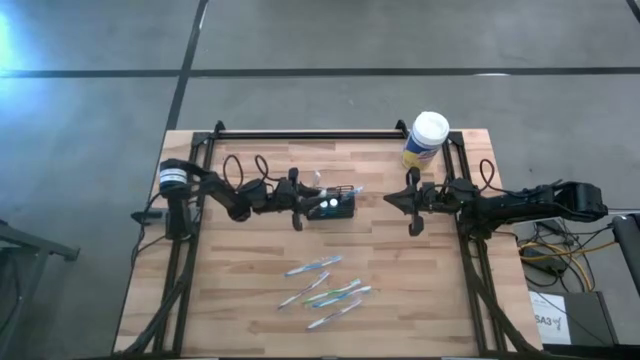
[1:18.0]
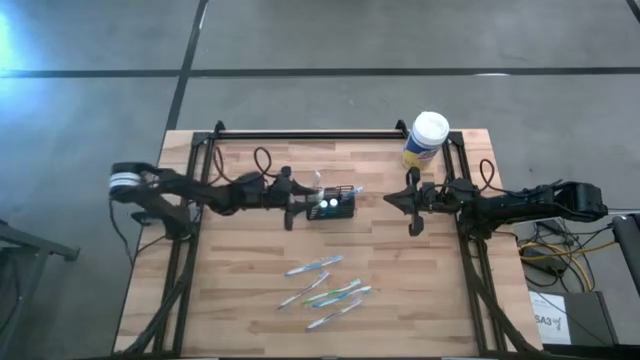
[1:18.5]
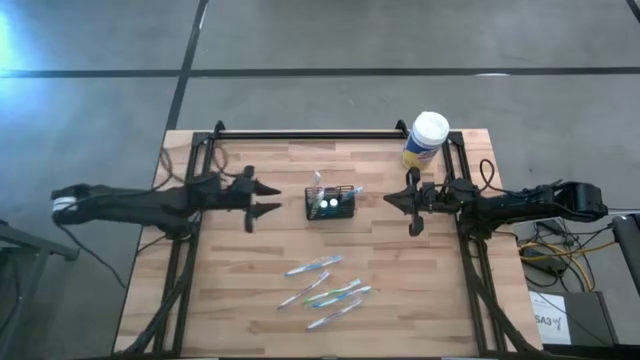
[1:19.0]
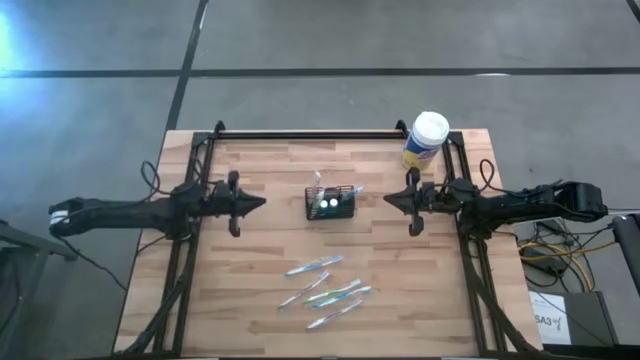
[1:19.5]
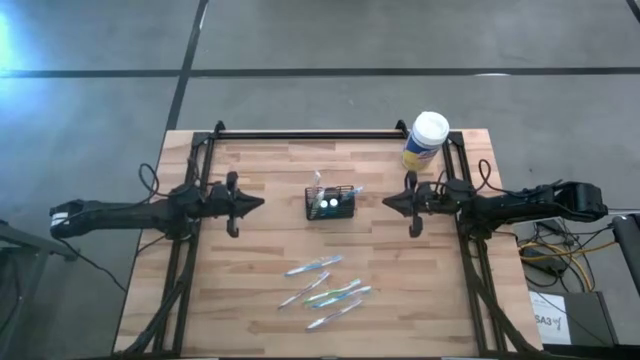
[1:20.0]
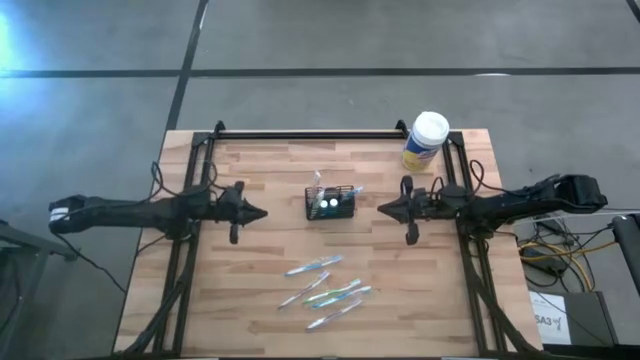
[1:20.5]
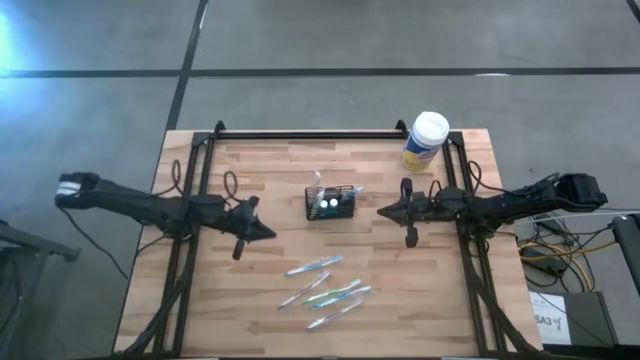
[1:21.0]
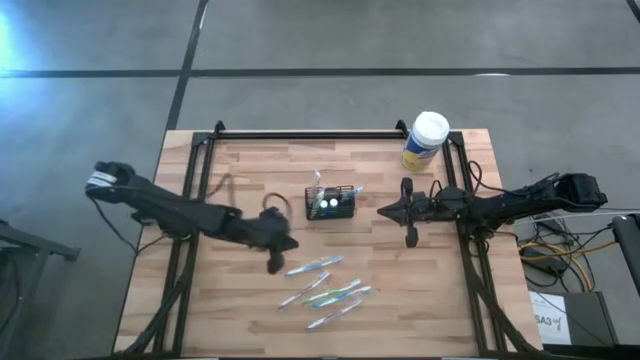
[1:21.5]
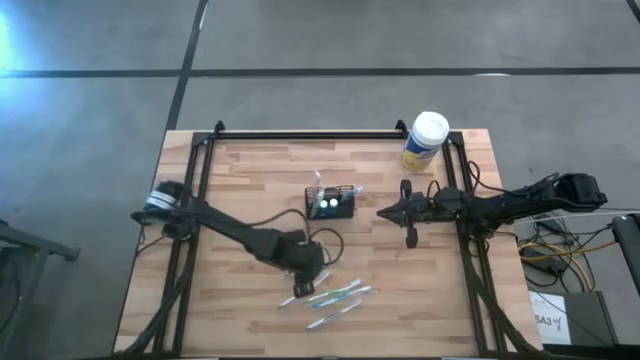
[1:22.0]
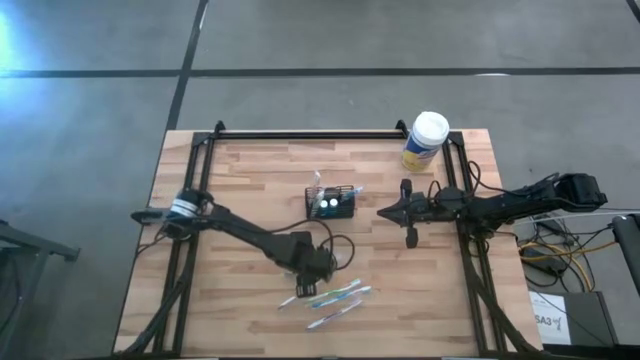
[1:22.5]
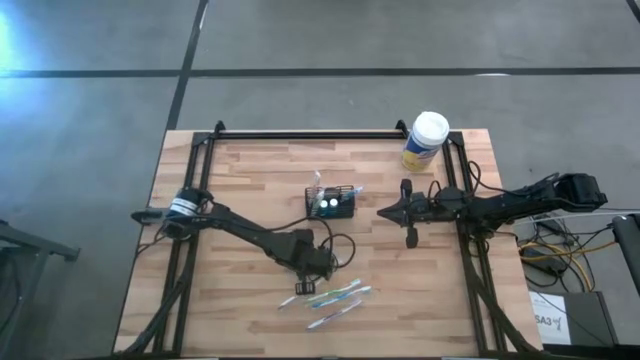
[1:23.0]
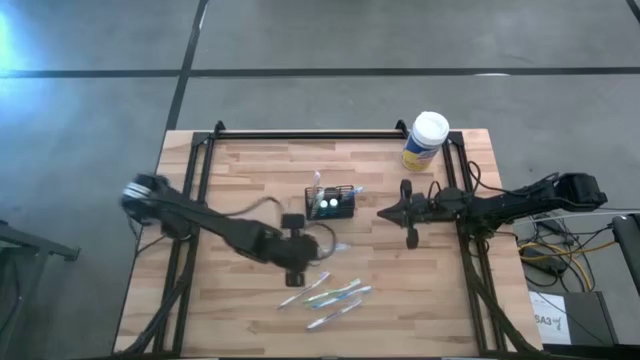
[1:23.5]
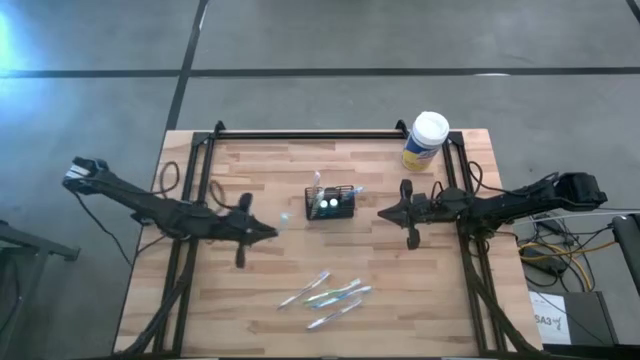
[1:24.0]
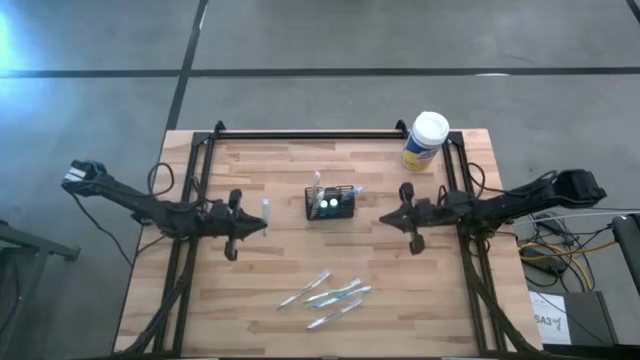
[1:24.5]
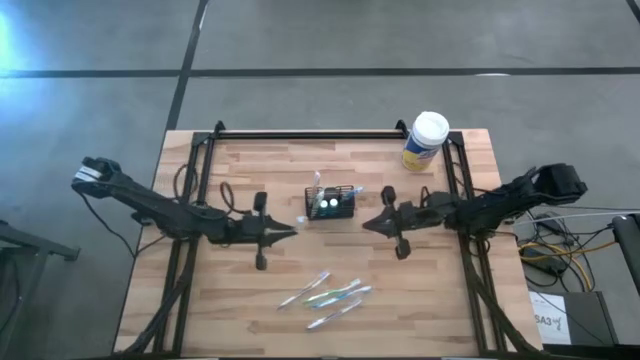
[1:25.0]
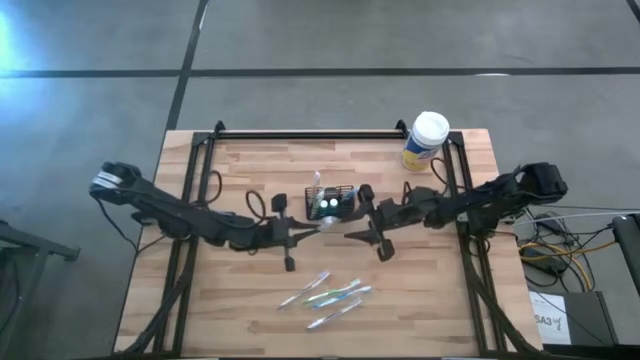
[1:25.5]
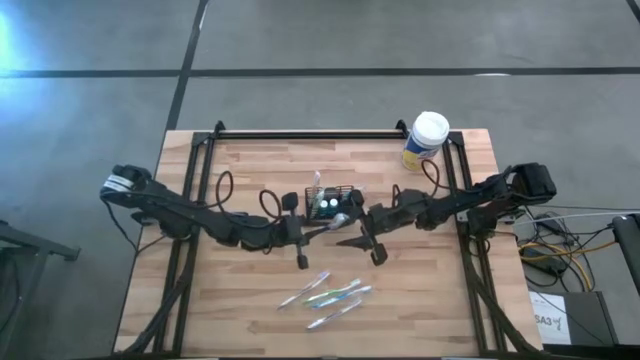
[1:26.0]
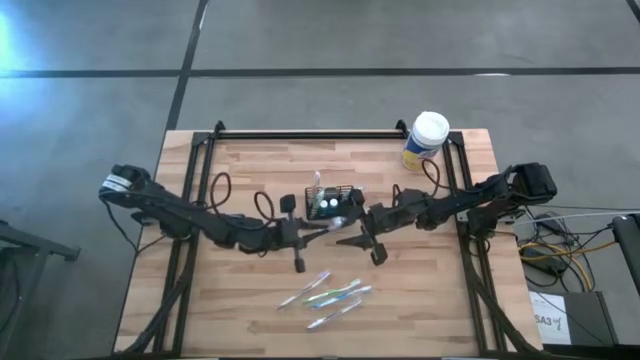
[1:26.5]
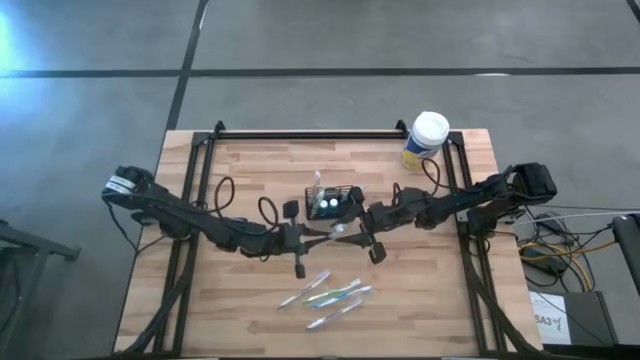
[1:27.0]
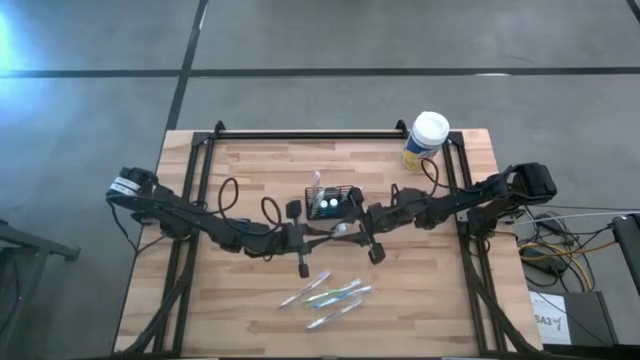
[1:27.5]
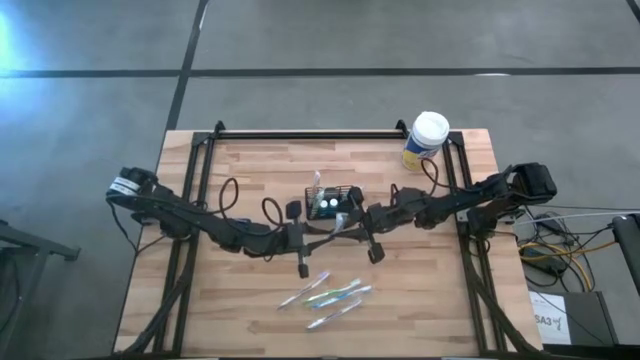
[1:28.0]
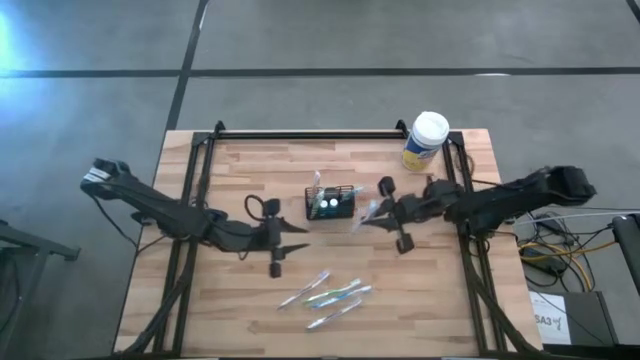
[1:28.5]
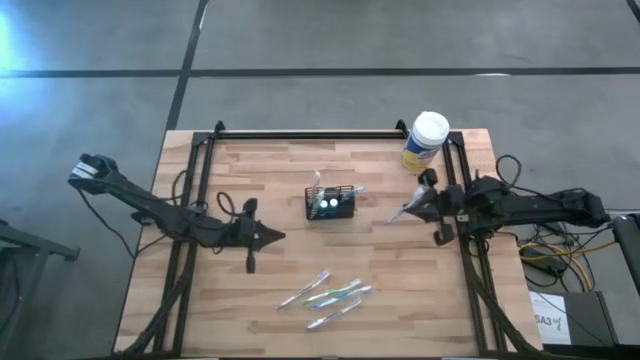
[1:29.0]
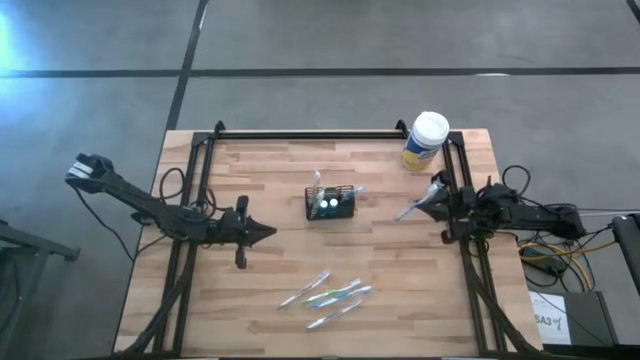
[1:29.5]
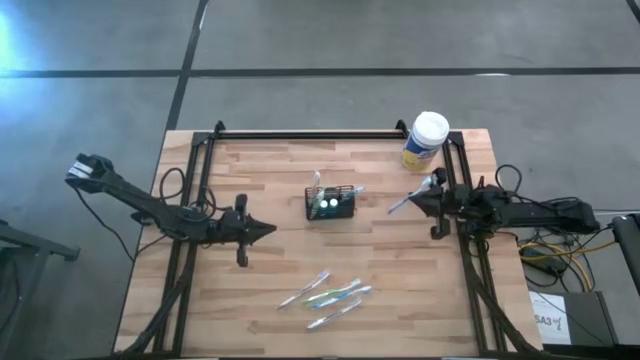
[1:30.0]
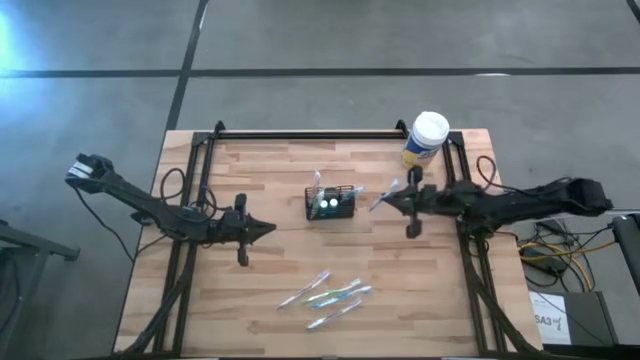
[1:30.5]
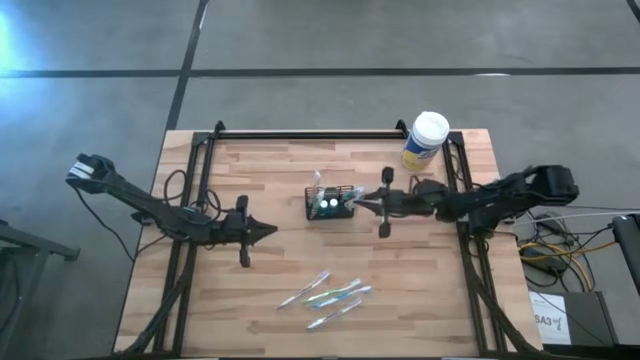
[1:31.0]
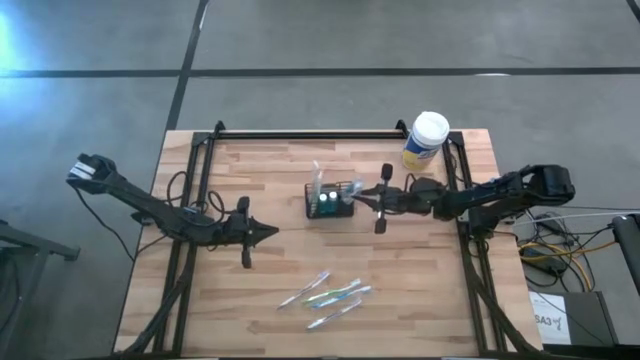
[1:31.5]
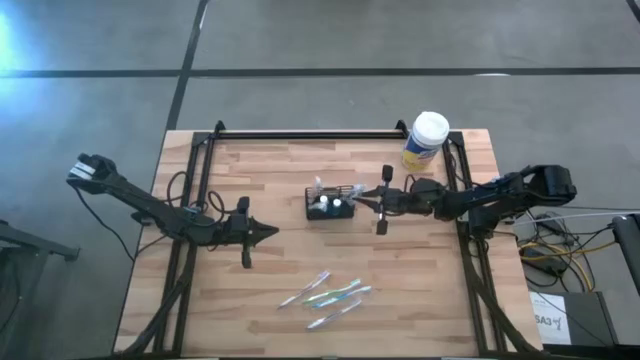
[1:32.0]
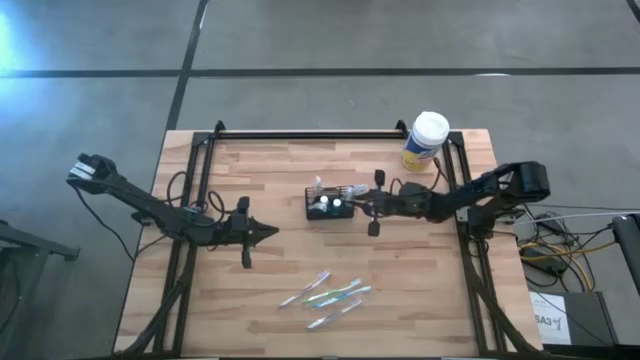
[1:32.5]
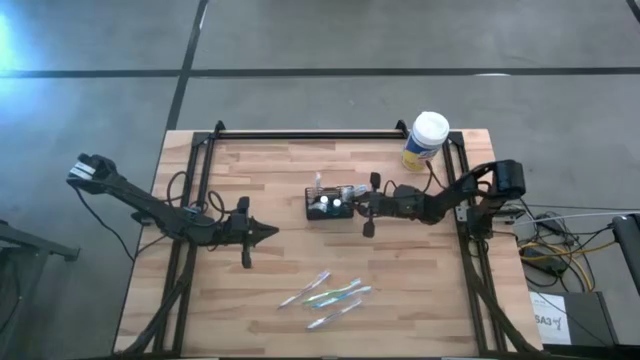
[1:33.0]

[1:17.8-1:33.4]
Task: Pick & Place toothbrushing station
Put the top blue toothbrush in the wire organizer

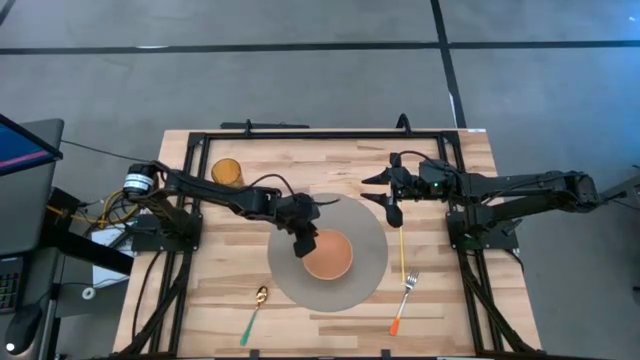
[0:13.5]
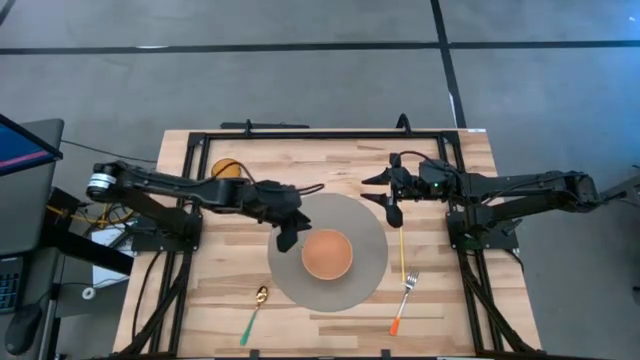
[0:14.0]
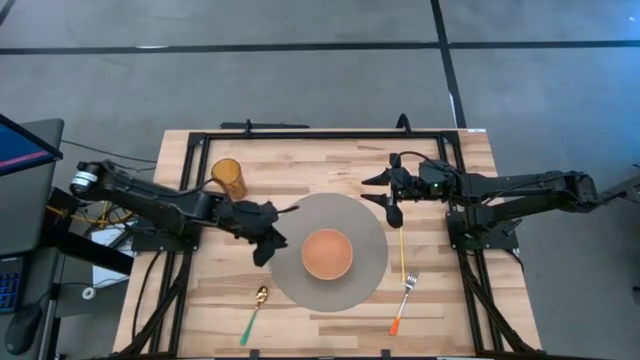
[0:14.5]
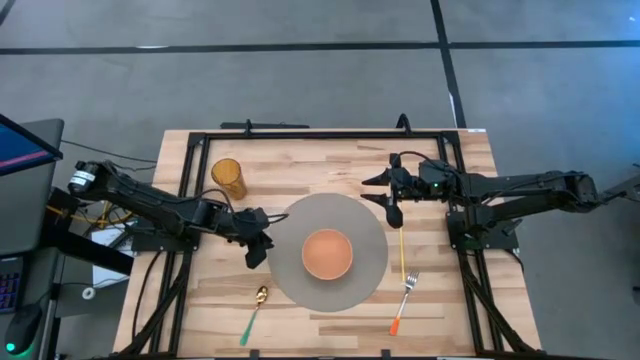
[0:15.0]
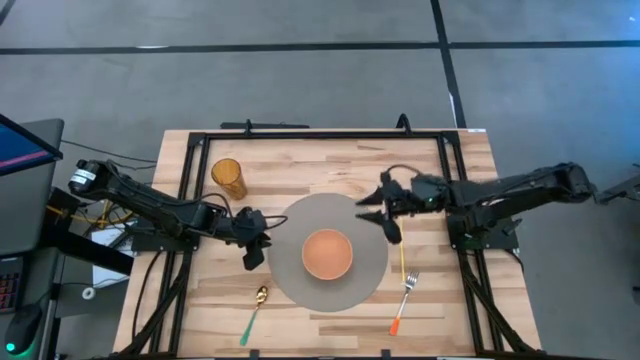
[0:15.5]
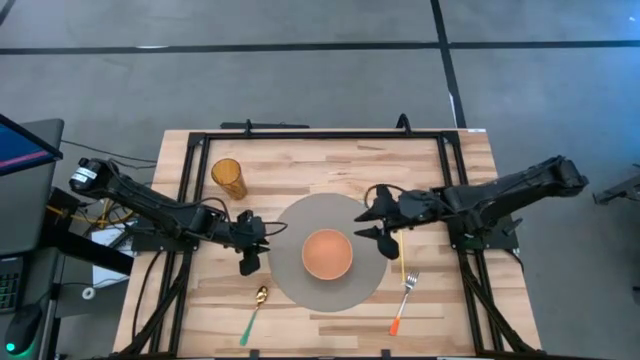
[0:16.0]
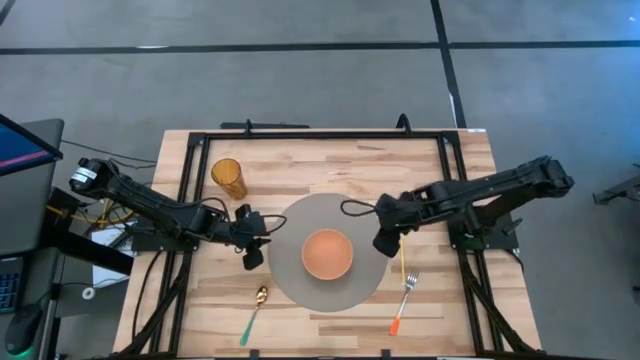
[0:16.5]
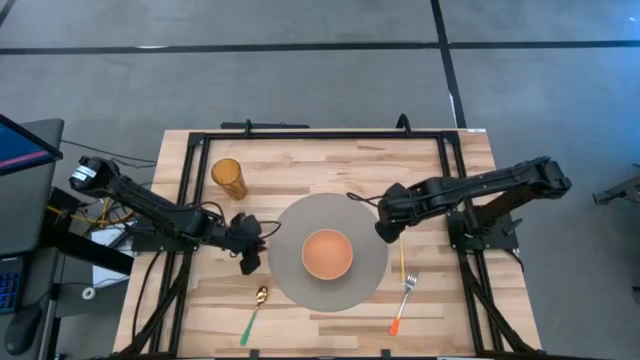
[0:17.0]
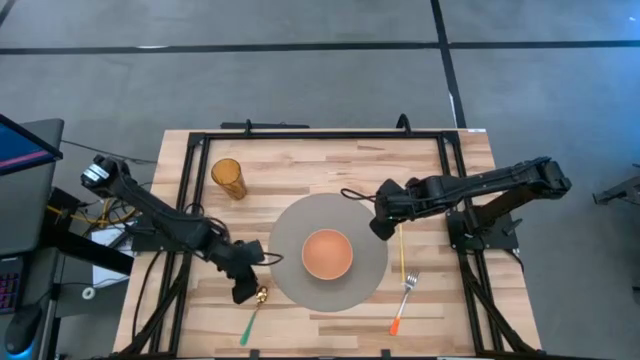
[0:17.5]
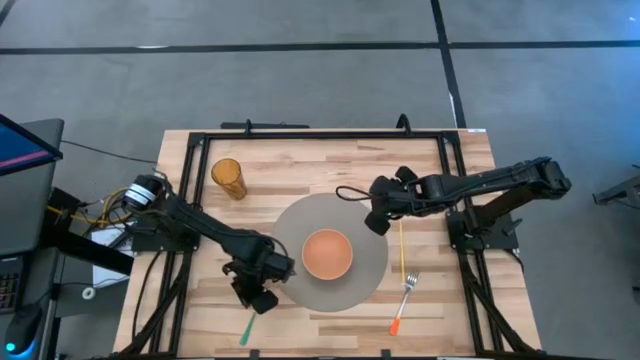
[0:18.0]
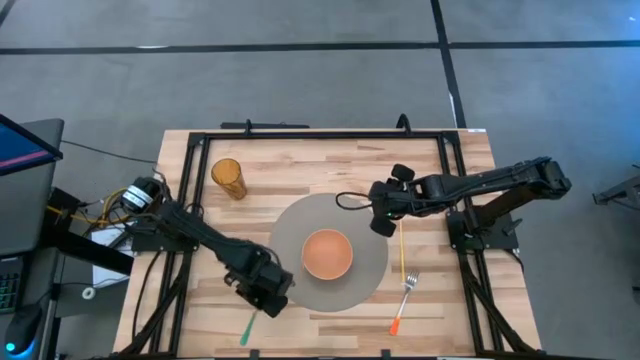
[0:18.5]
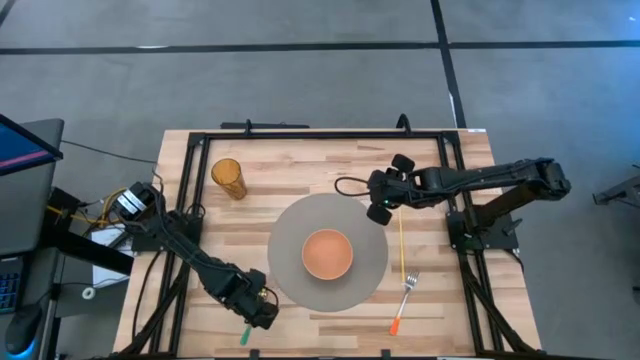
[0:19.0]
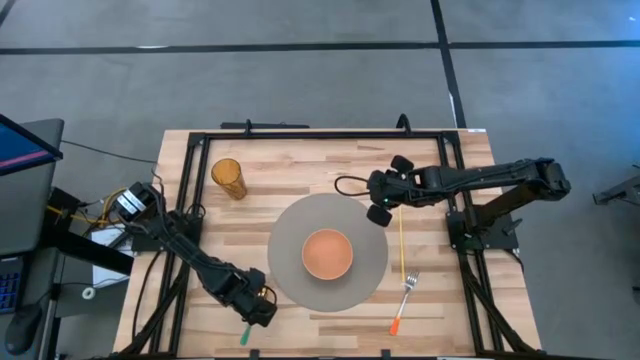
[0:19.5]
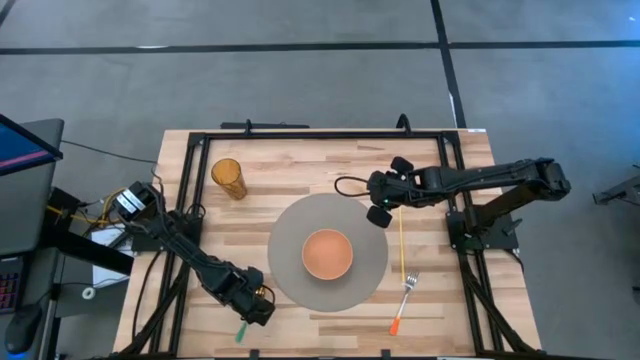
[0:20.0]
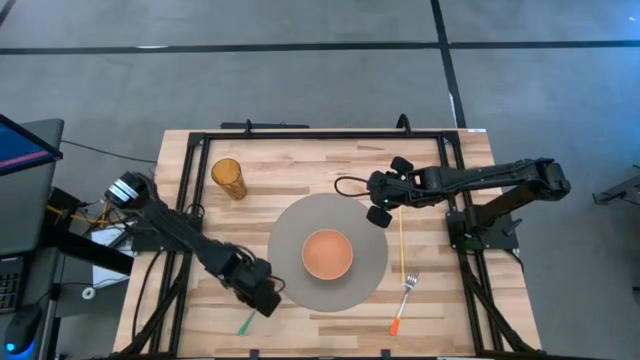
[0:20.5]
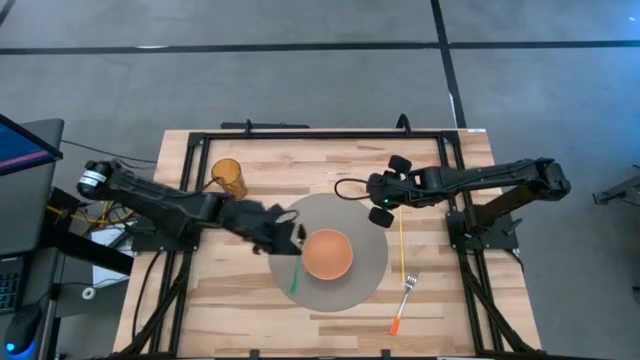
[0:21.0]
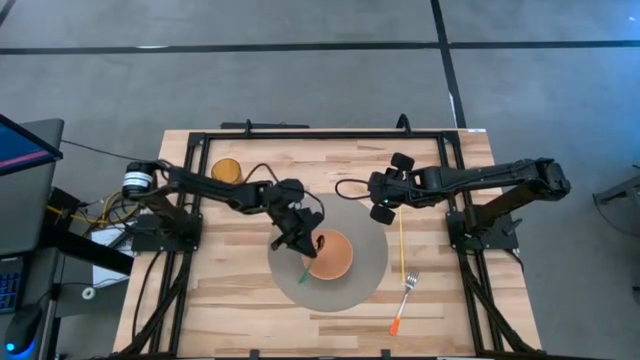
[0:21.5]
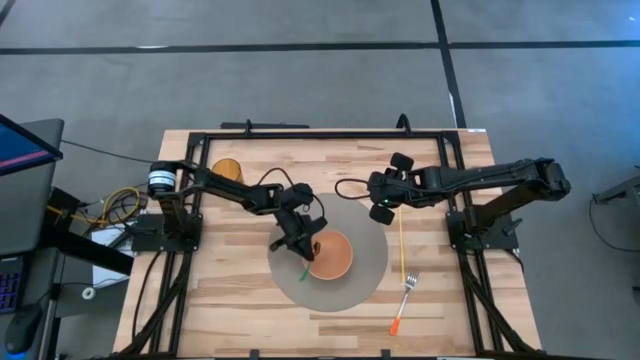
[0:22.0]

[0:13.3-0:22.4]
Task: Pick & Place Utensil
Put the green spoon into the pink bowl
